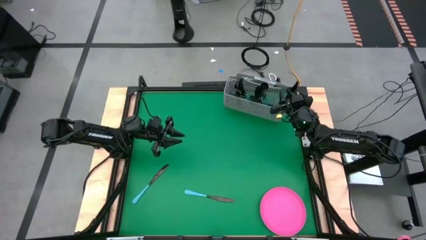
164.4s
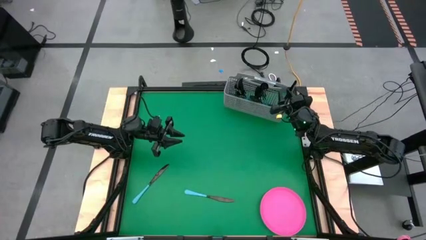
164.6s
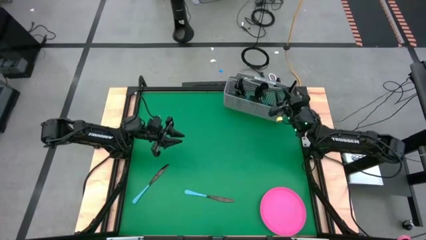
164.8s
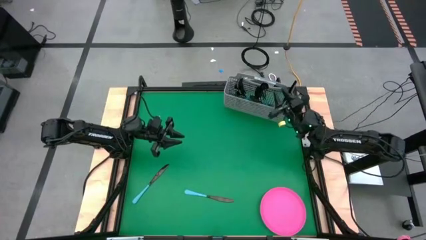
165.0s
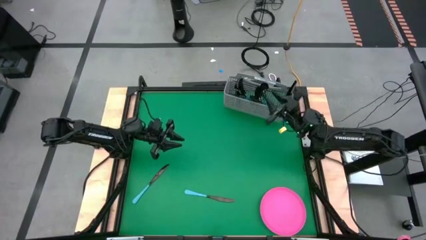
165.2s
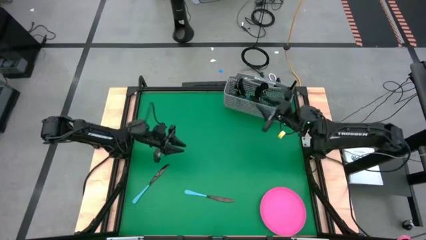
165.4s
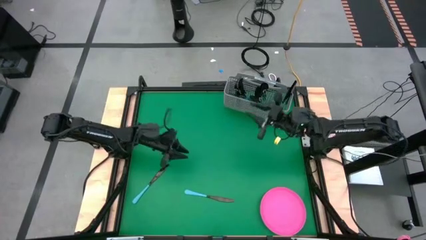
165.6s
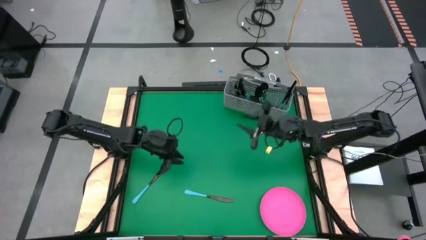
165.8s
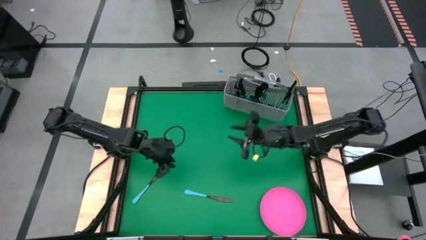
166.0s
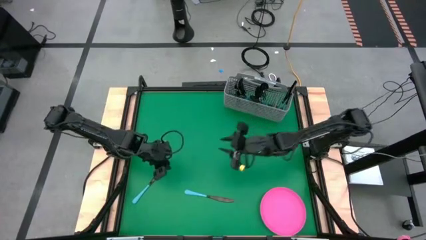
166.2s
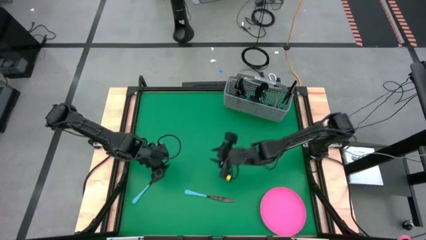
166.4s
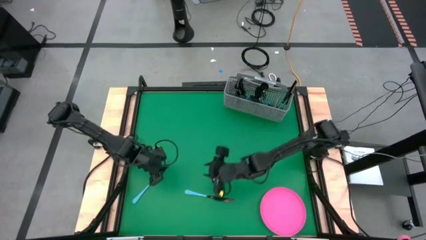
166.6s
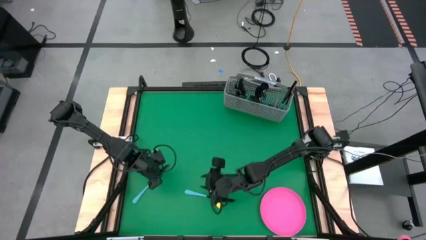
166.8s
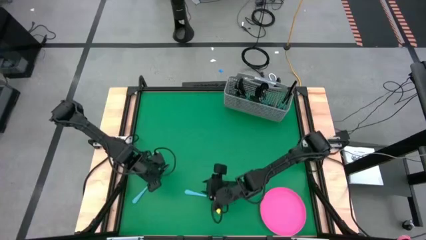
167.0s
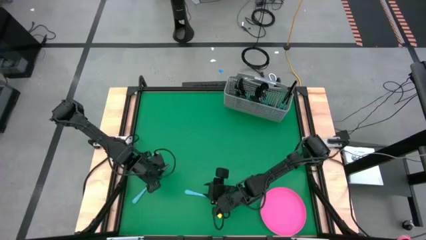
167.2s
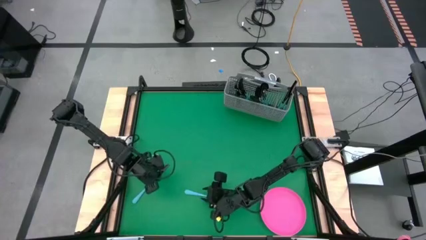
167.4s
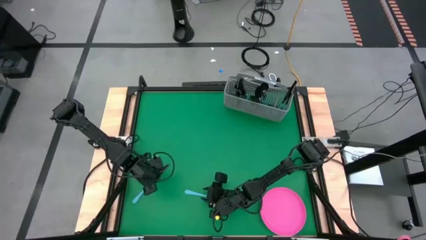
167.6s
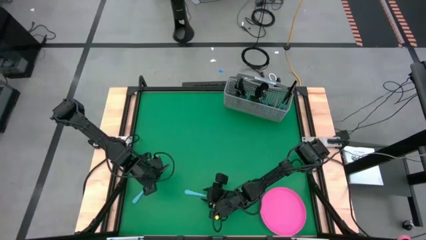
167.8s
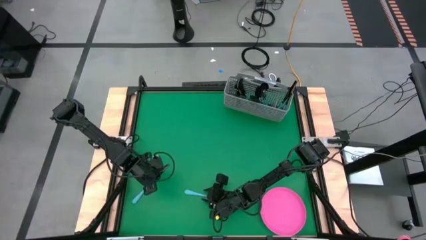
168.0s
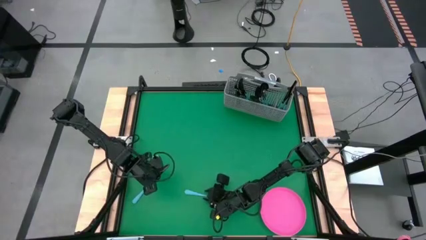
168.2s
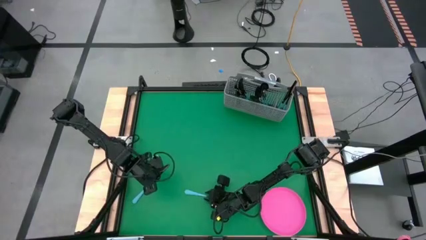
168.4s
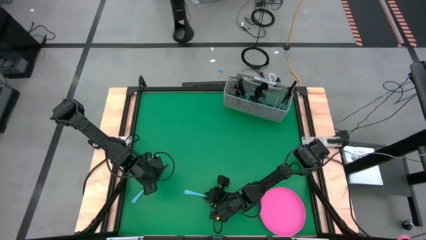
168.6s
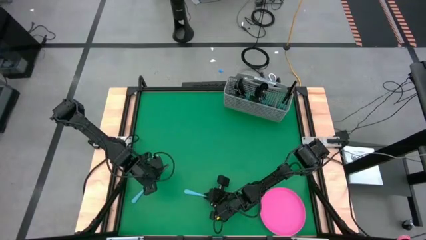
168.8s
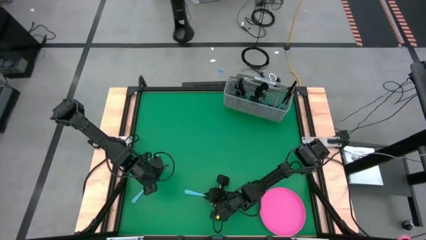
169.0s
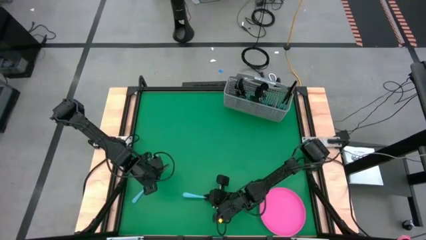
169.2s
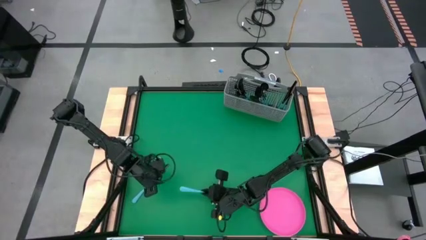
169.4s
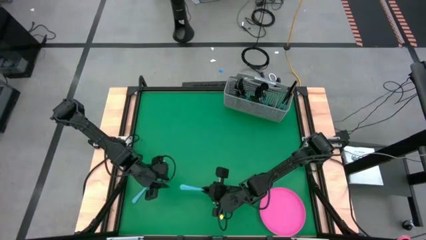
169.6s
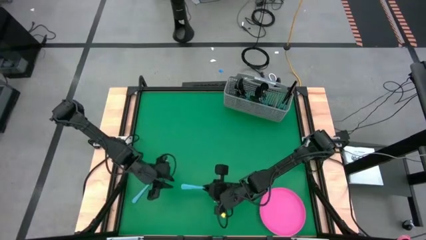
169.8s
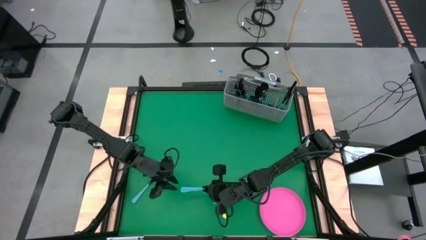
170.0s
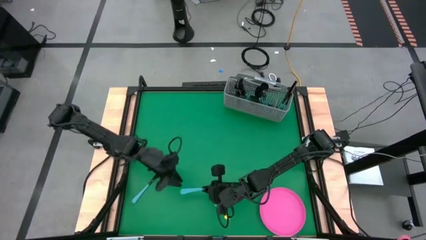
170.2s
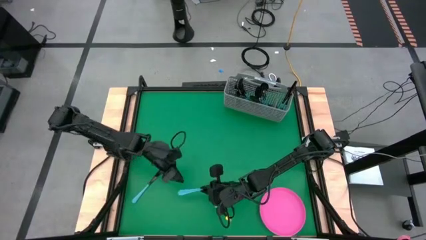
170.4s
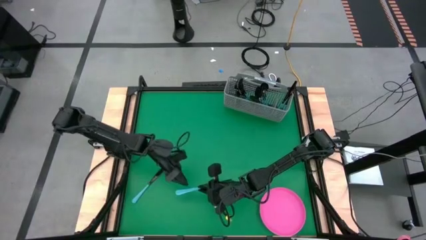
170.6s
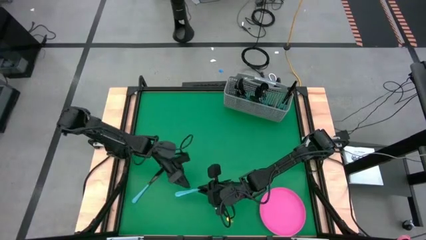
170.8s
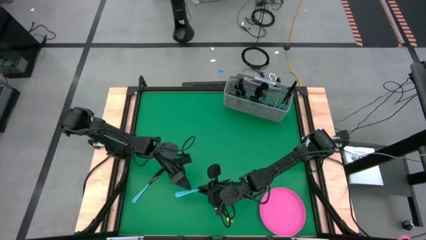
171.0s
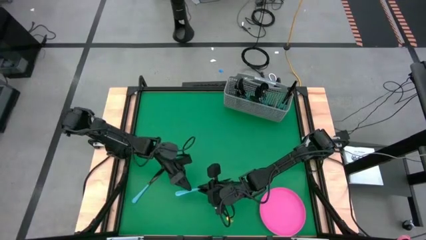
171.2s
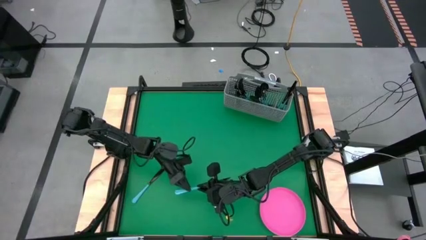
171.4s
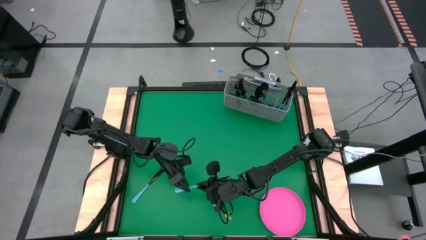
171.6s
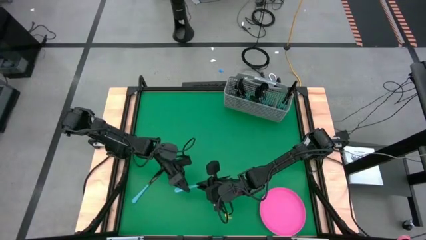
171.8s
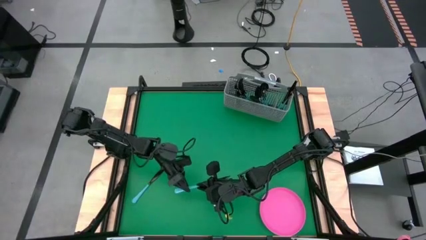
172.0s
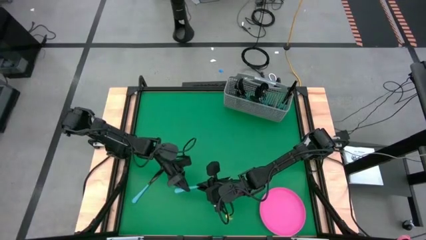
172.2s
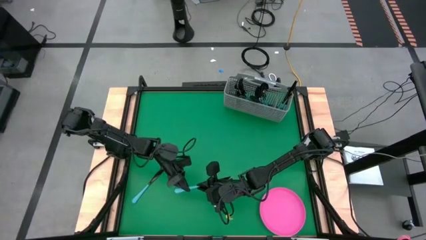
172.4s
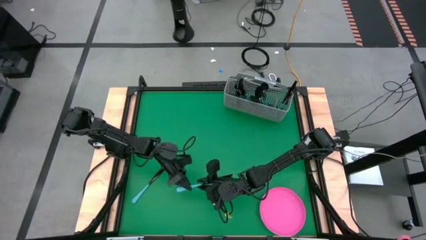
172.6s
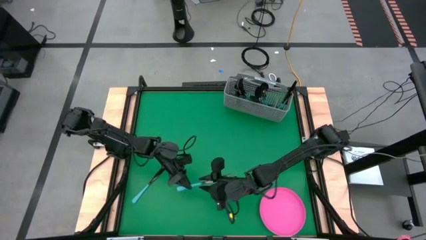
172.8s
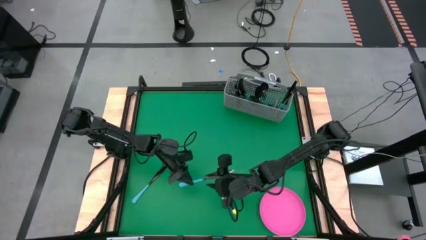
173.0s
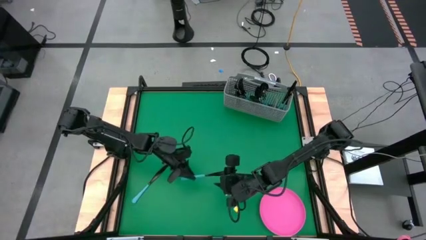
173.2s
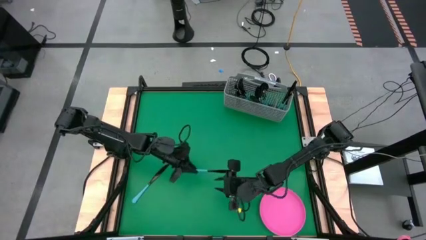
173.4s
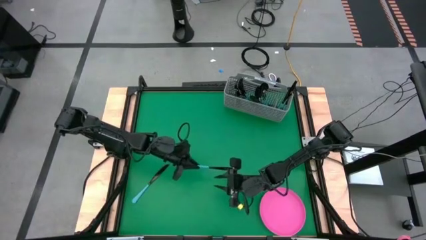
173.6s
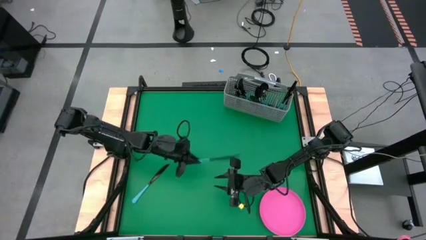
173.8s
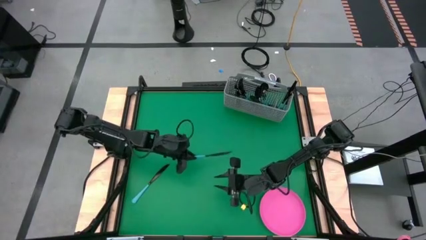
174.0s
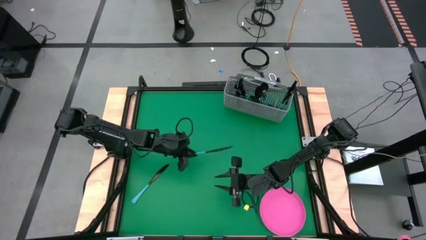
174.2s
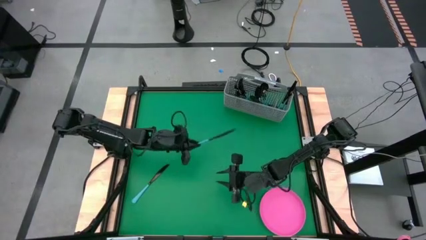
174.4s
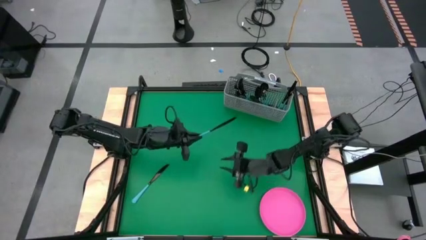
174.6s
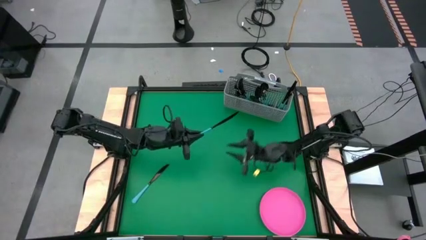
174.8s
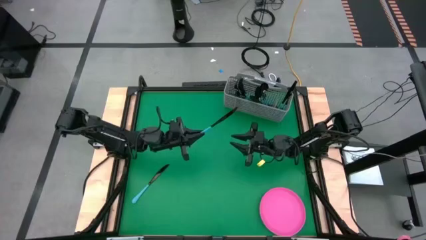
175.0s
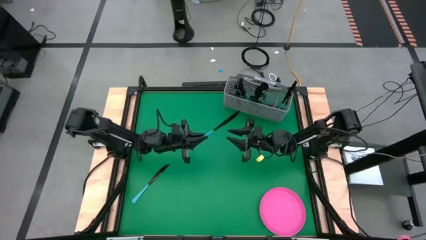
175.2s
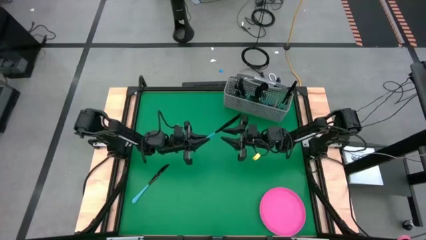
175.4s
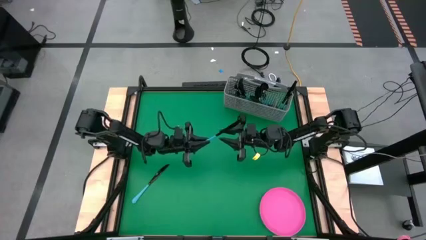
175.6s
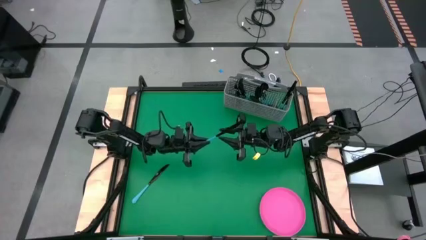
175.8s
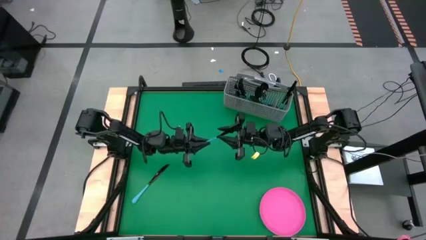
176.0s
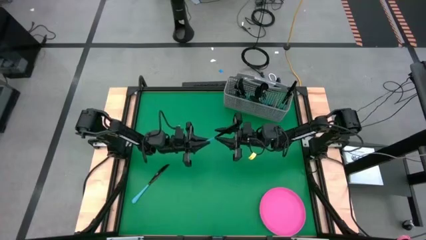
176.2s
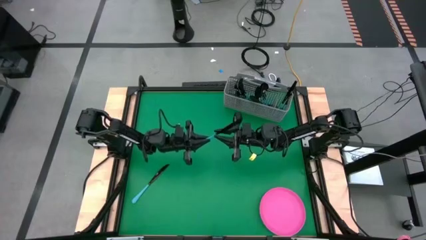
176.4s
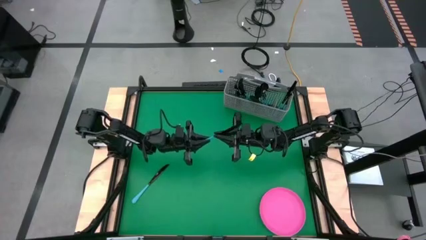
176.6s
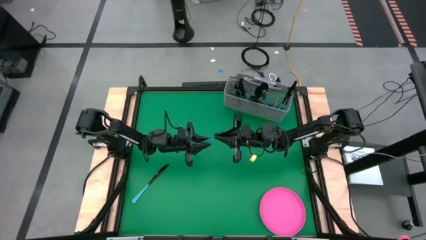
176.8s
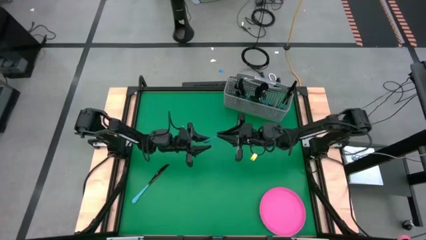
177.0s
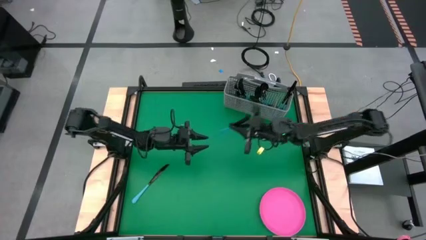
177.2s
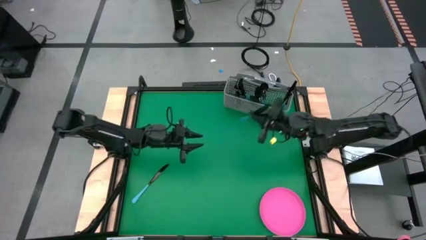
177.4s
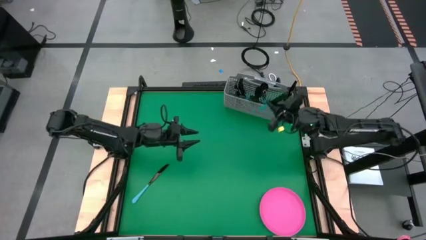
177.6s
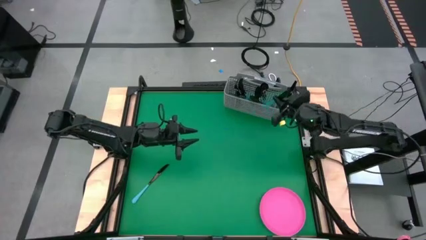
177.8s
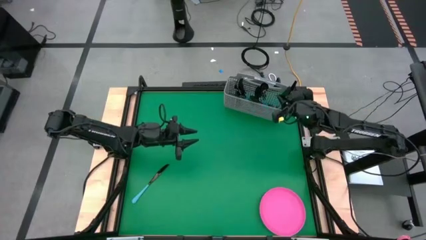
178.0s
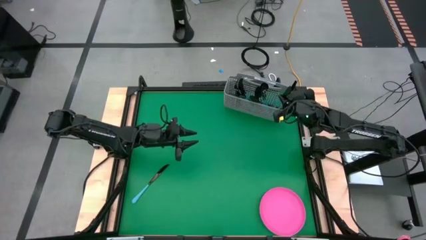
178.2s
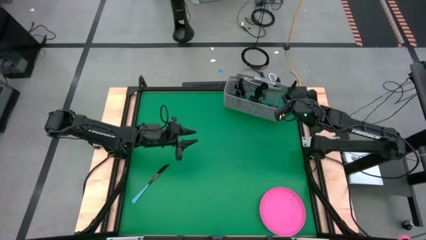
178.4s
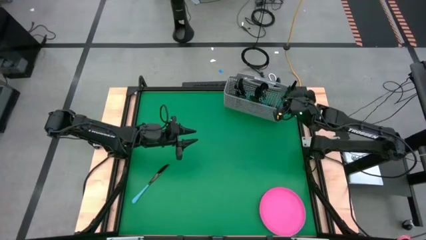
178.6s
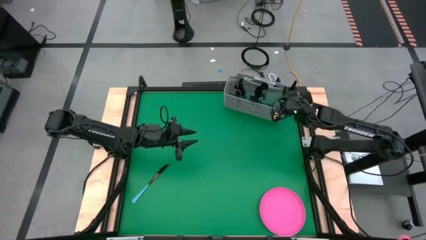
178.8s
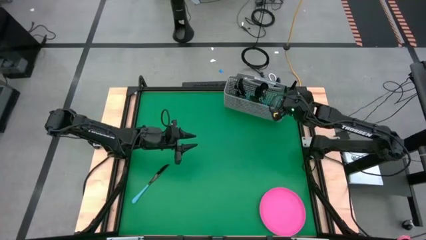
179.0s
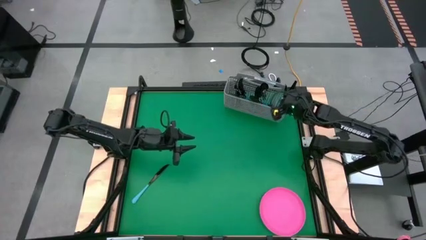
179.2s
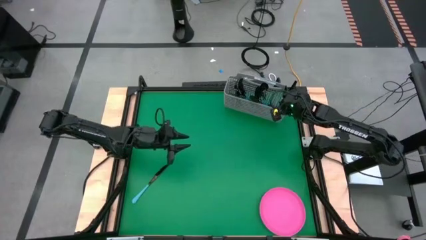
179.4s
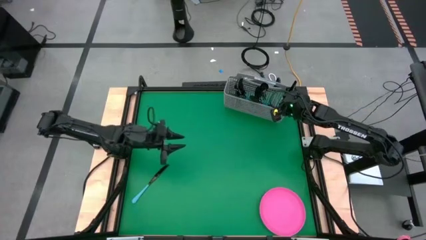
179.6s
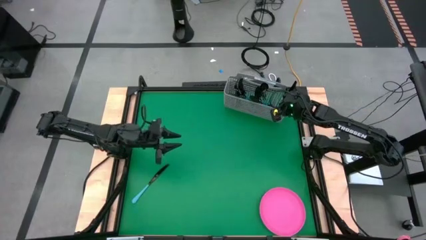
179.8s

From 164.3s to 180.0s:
Task: Sort silverware
Put the blue table knife into the silverware basket
